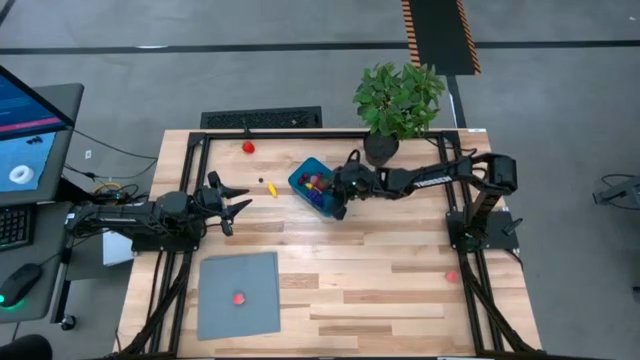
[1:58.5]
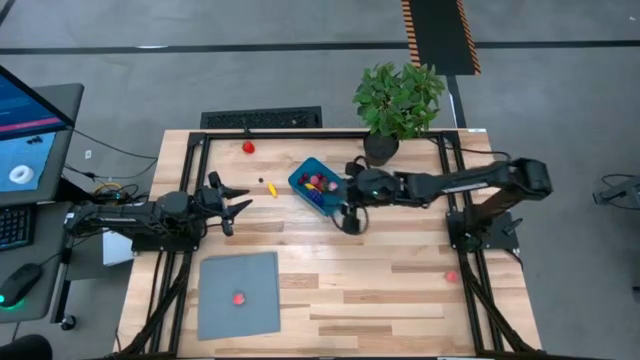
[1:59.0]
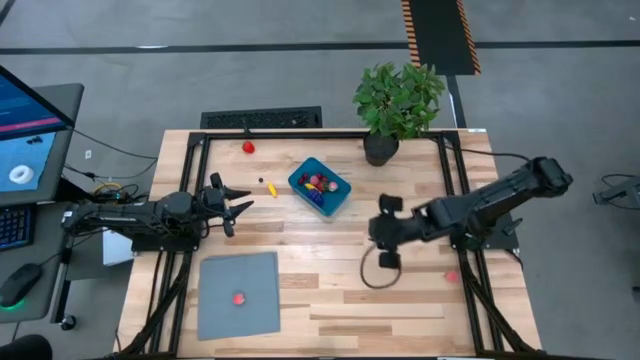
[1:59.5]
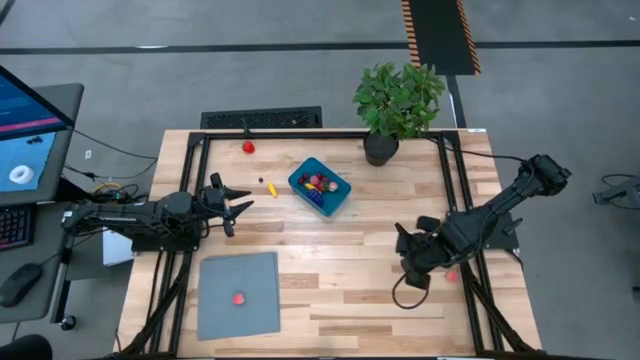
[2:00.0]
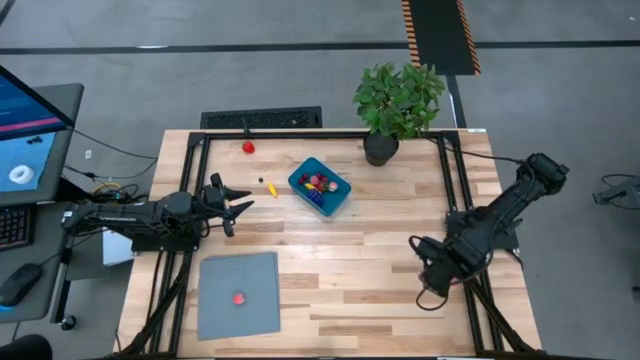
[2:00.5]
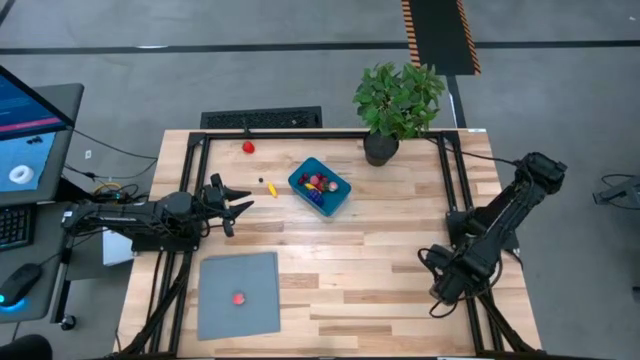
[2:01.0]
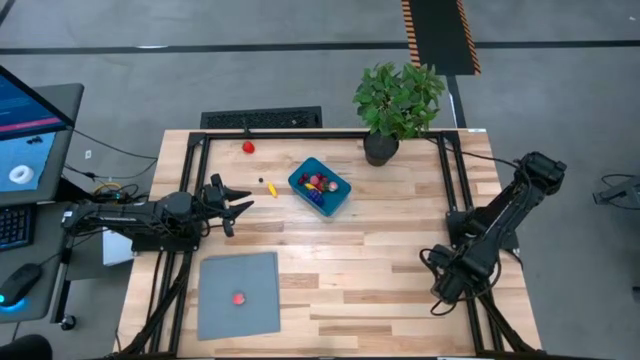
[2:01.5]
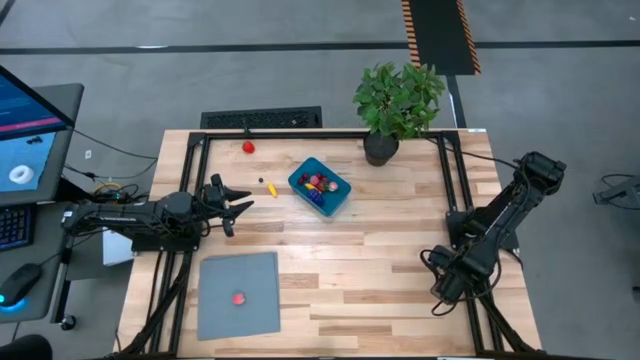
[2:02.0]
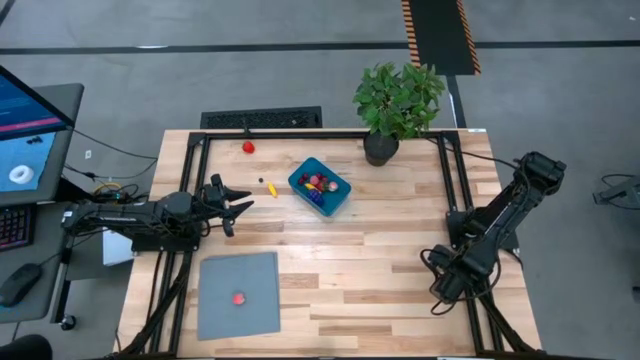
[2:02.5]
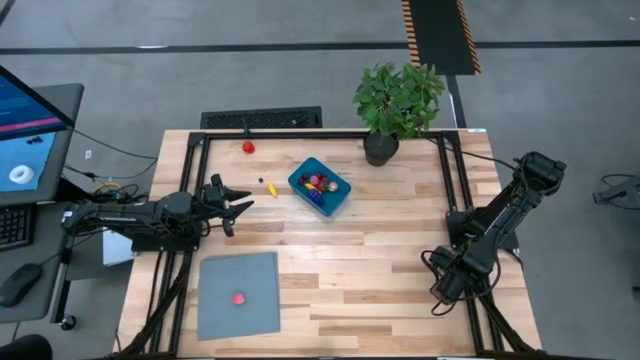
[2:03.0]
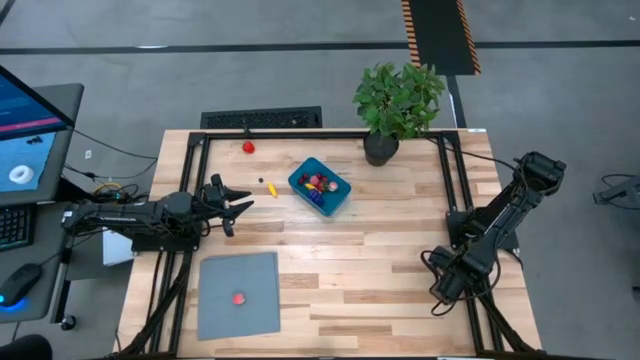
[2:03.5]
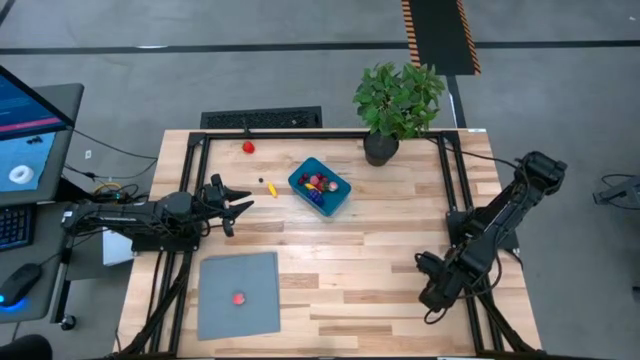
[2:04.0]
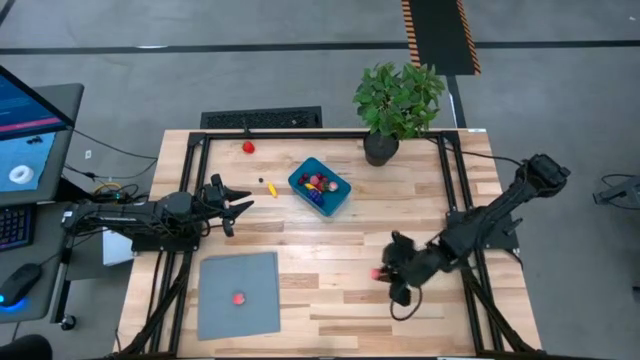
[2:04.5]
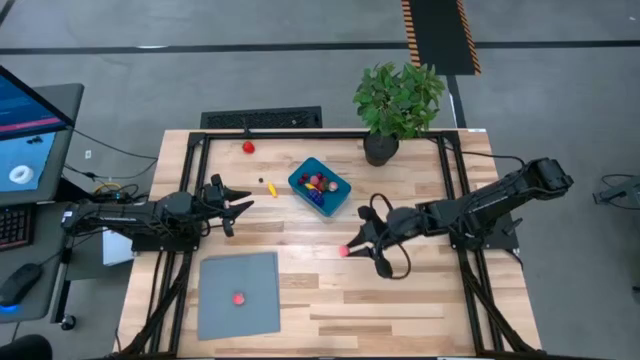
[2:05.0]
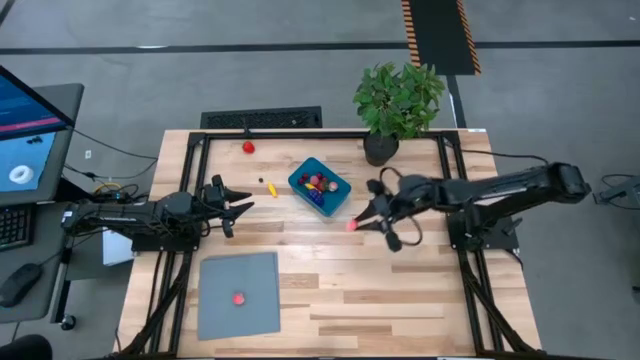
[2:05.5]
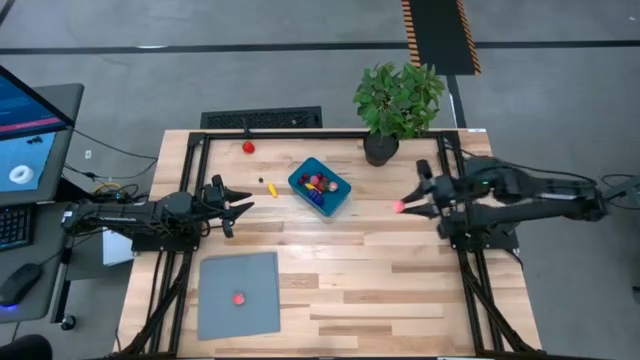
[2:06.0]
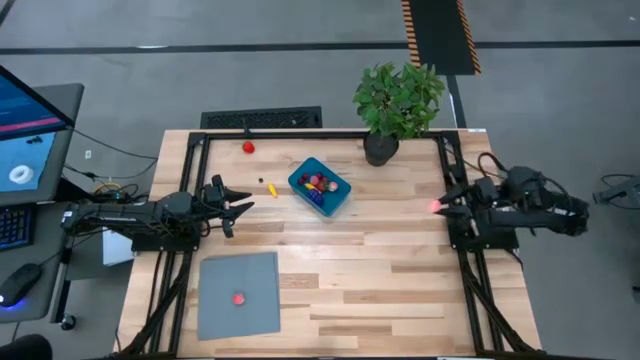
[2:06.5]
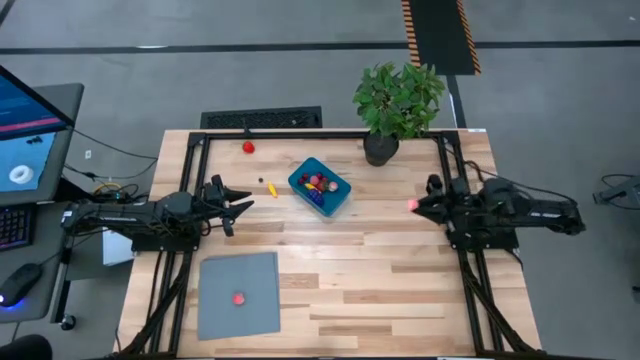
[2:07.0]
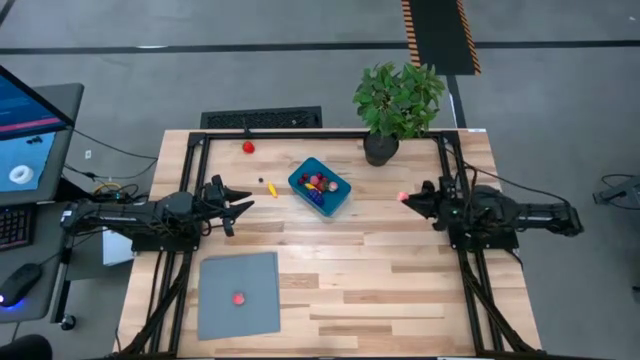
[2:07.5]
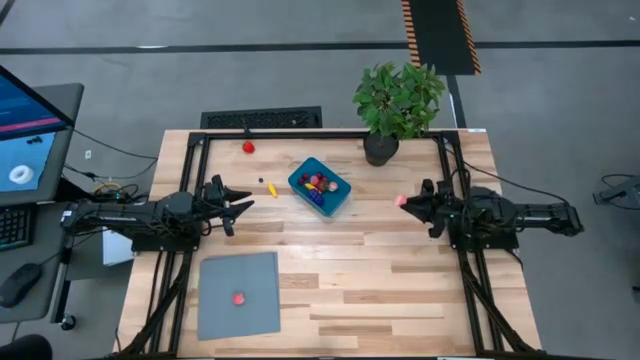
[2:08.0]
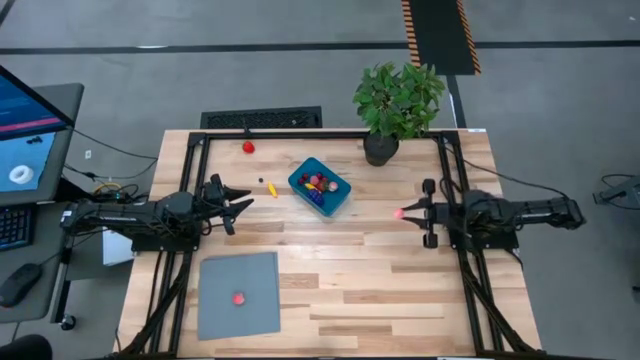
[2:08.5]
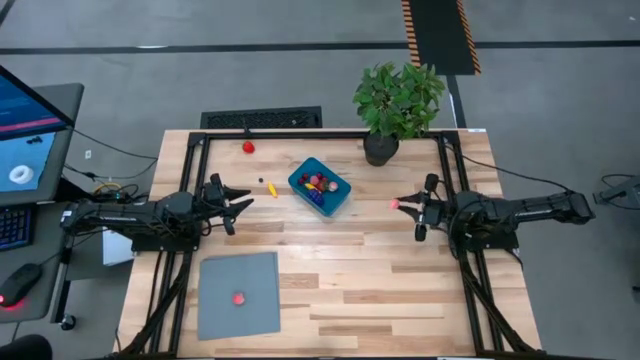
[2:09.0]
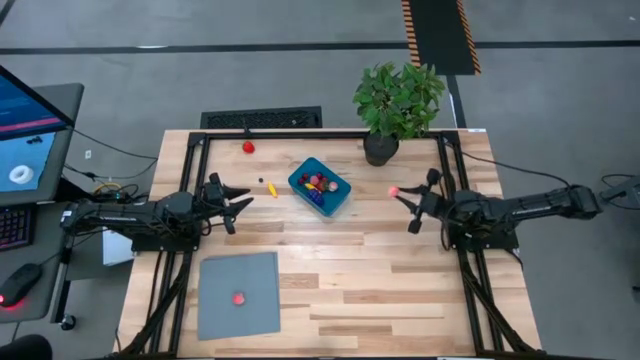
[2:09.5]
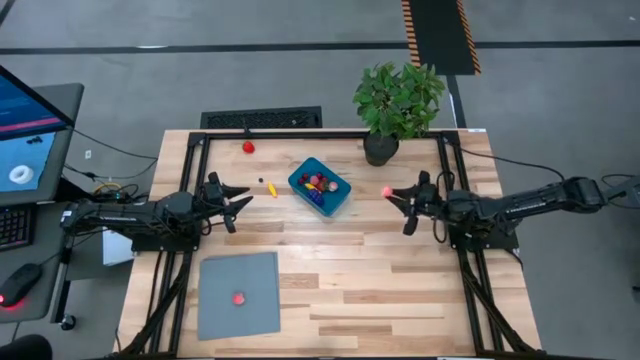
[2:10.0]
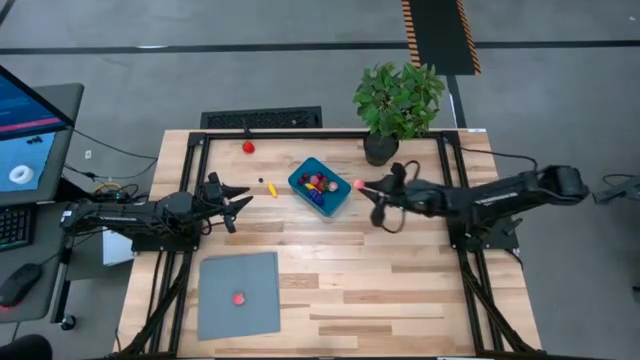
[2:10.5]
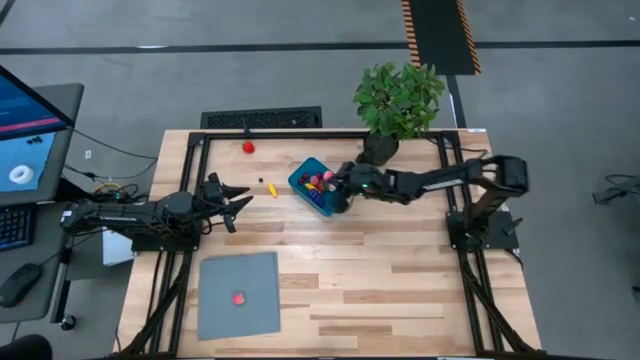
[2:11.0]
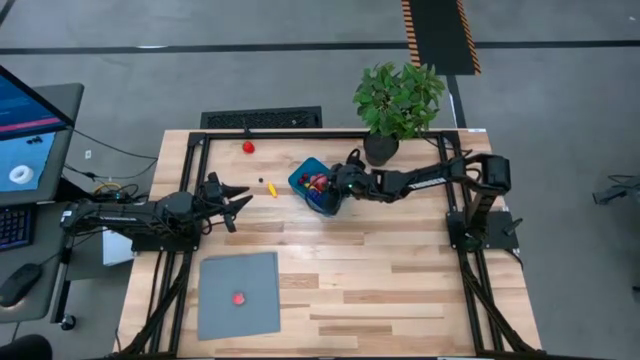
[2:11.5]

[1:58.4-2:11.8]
Task: Pick and placing Produce into tupperware
Put the right apricot into the container

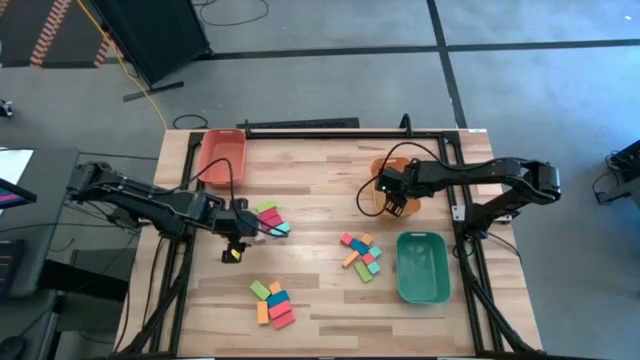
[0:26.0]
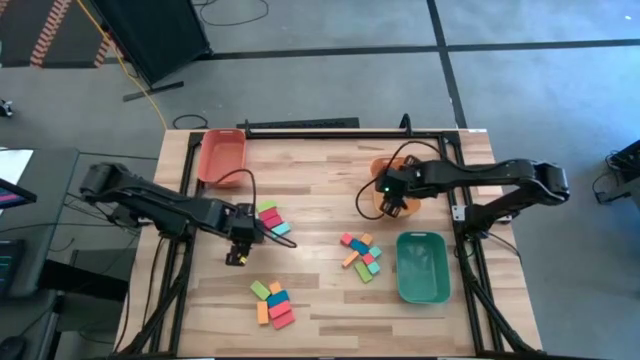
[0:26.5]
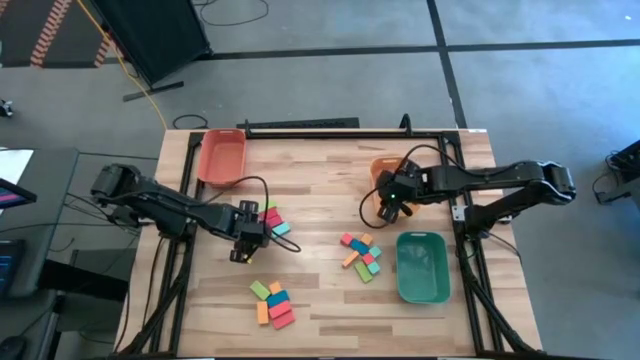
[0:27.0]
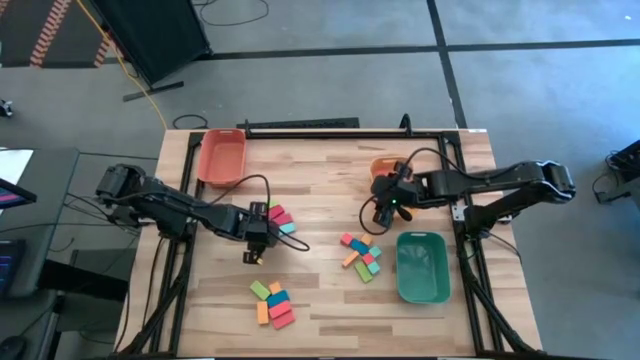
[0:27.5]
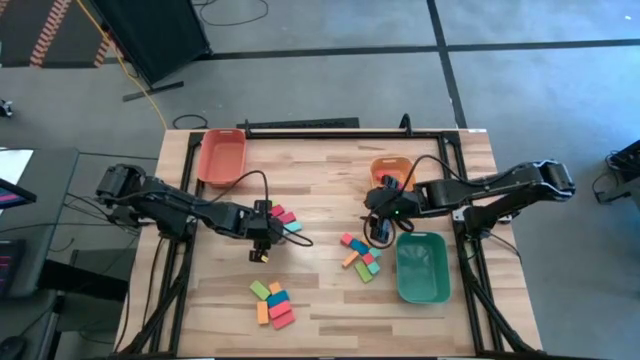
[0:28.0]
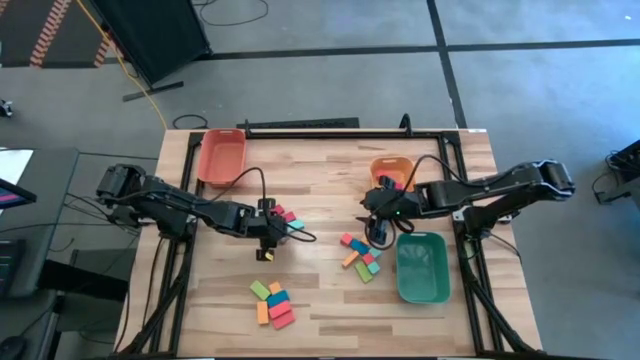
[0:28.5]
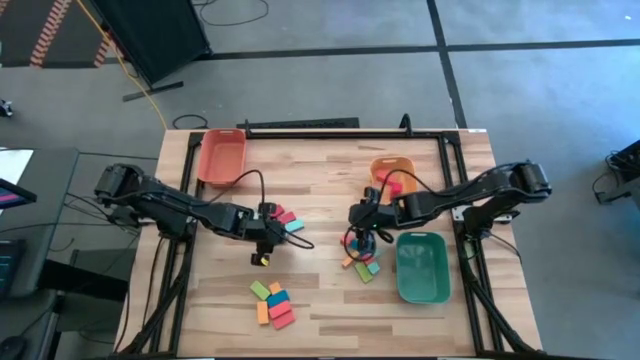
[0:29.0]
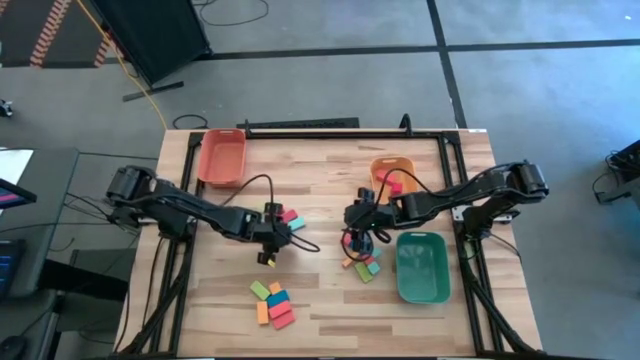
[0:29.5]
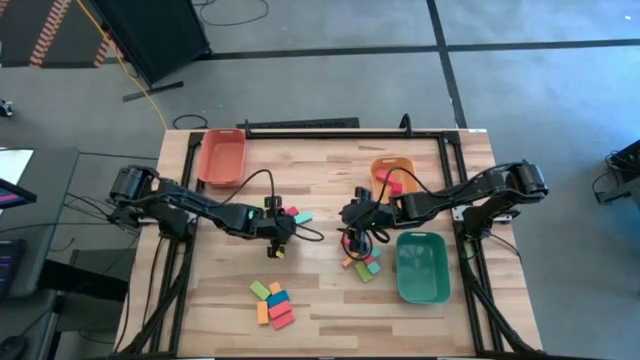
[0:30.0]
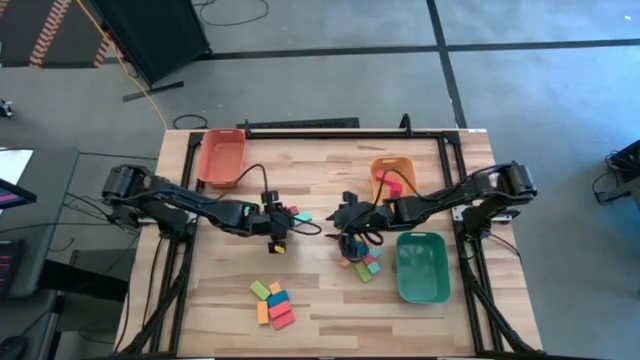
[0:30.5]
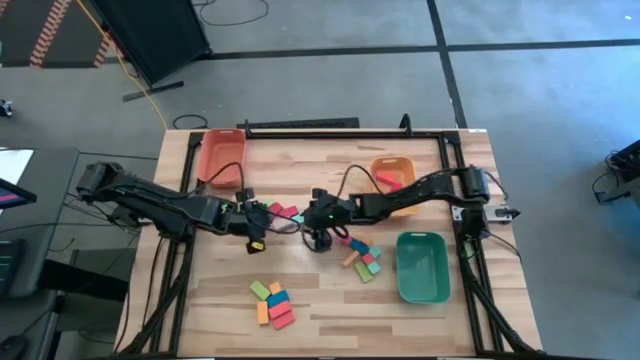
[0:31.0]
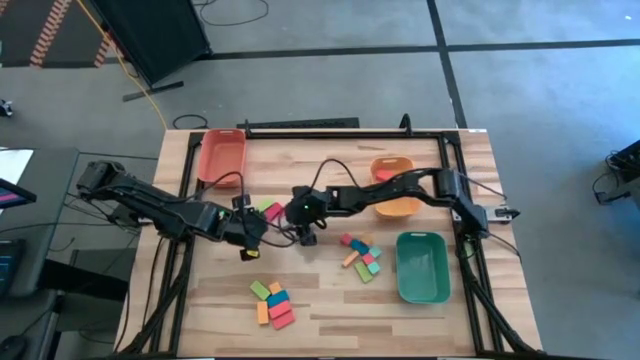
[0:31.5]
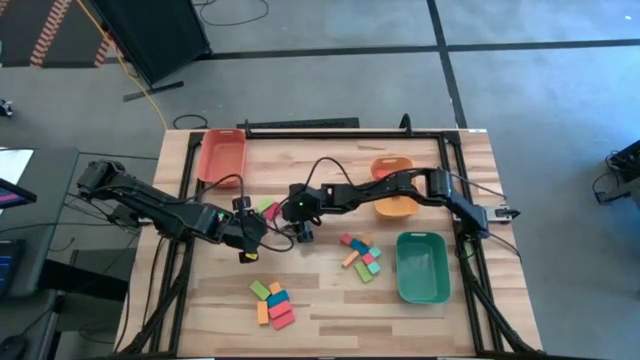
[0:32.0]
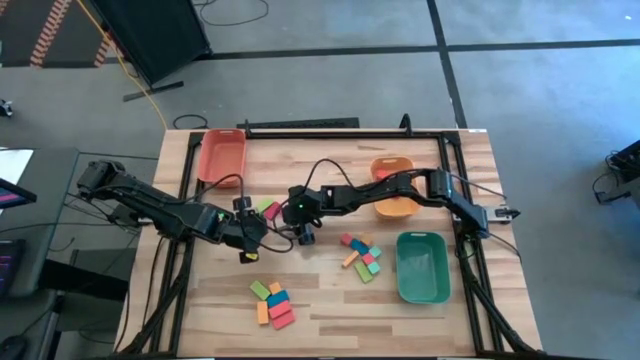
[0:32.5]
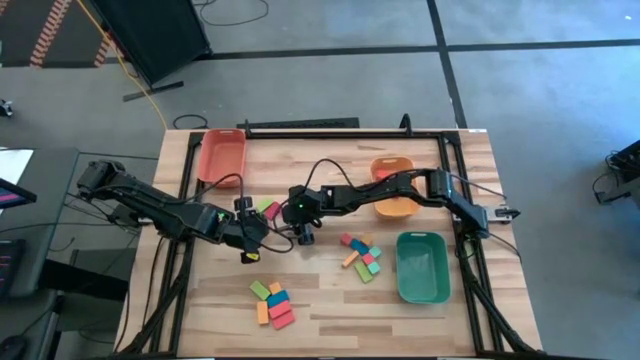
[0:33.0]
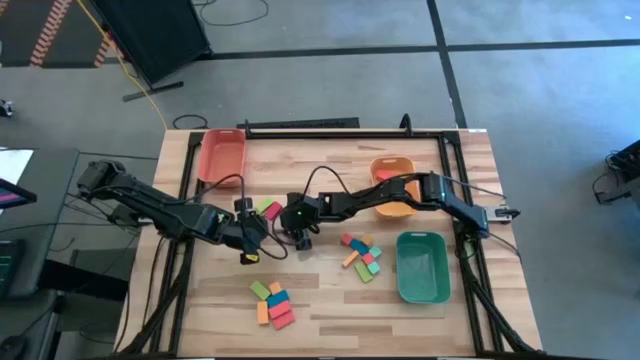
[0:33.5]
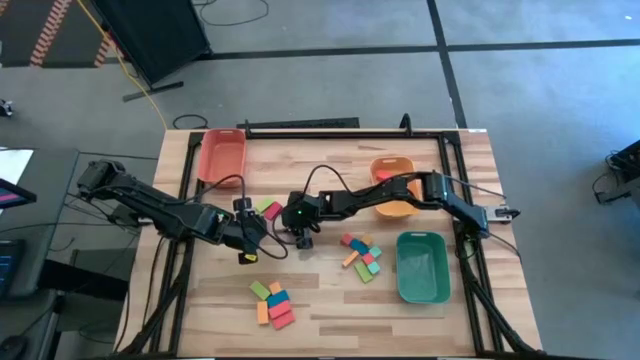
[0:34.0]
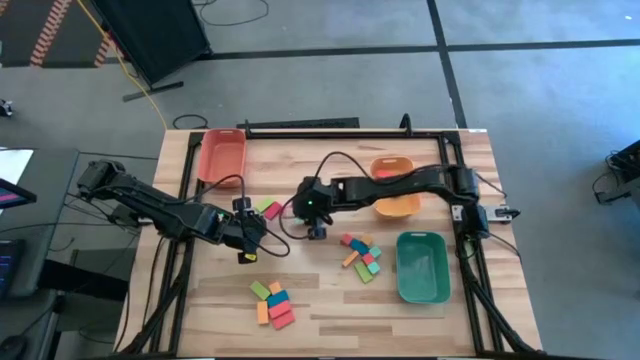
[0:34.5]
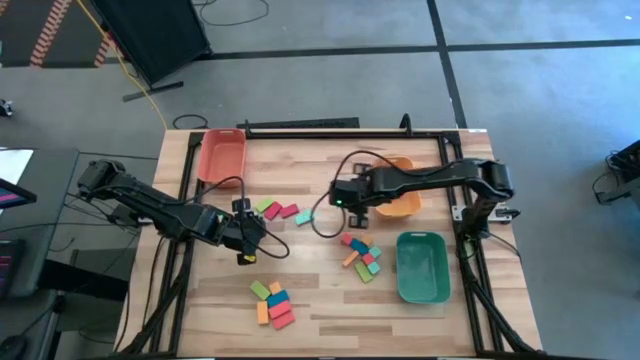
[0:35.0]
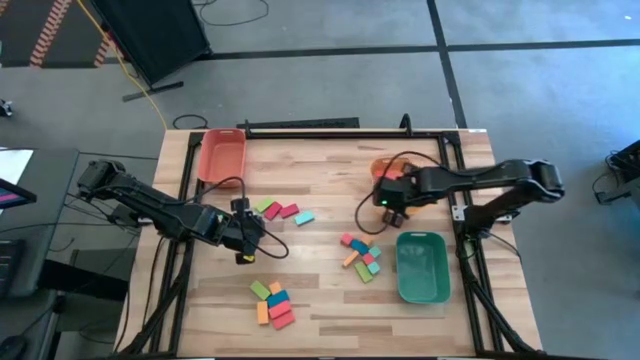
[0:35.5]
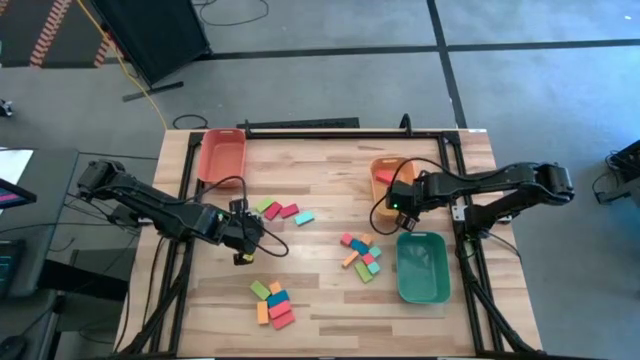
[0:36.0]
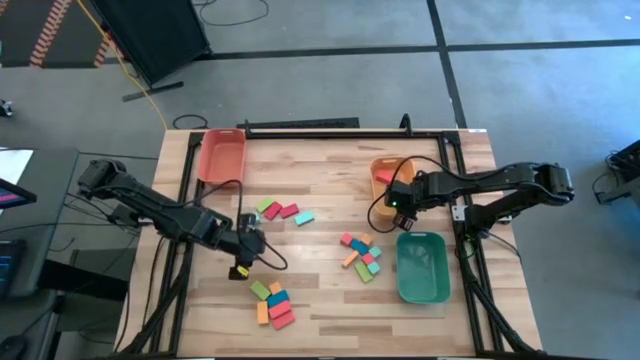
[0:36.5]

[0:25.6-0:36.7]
Task: Sort blocks by size
Put the large rectangular brown block into the yellow bin
